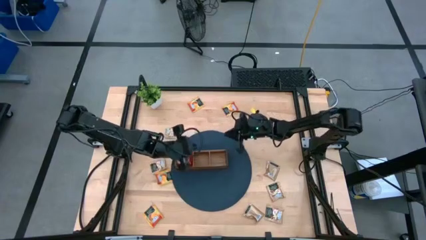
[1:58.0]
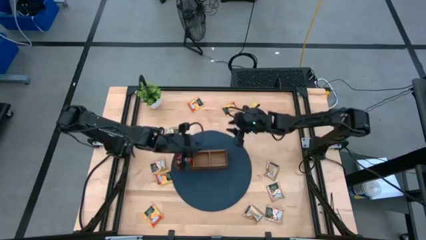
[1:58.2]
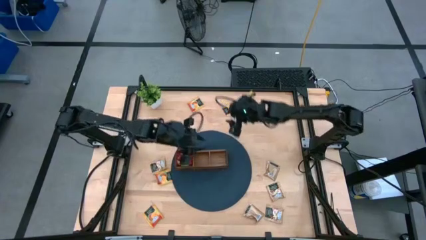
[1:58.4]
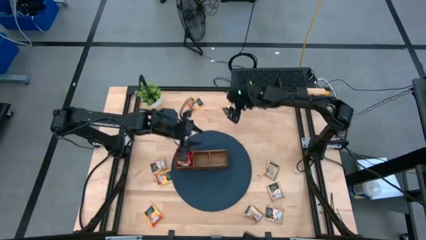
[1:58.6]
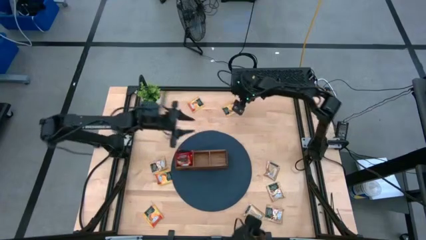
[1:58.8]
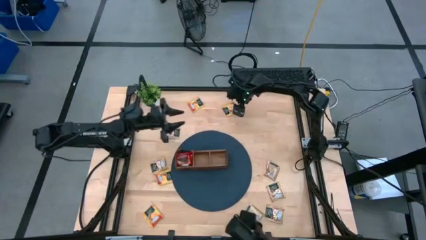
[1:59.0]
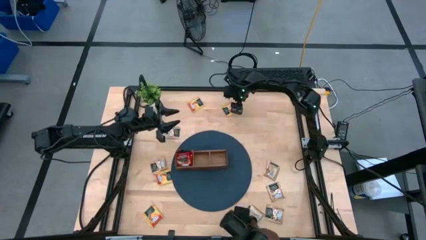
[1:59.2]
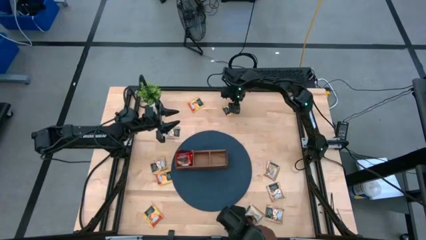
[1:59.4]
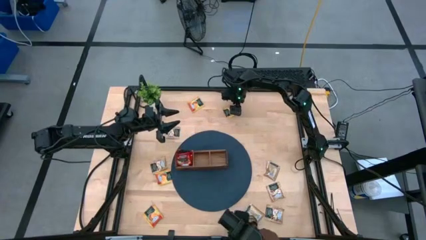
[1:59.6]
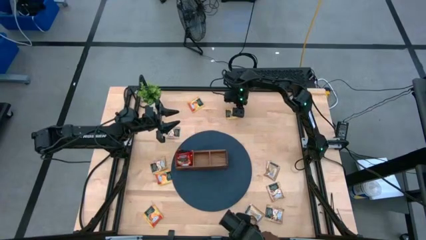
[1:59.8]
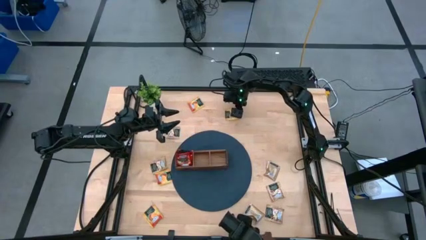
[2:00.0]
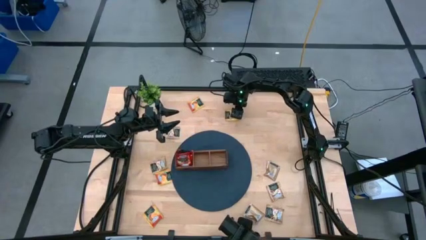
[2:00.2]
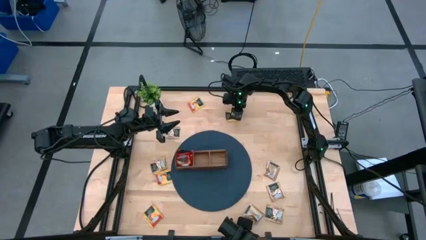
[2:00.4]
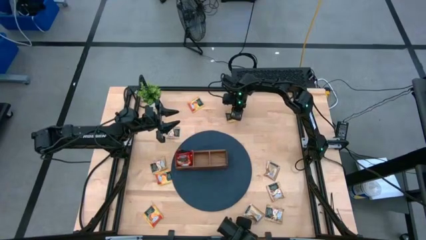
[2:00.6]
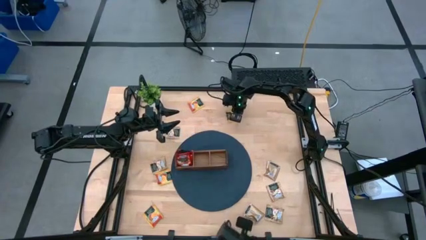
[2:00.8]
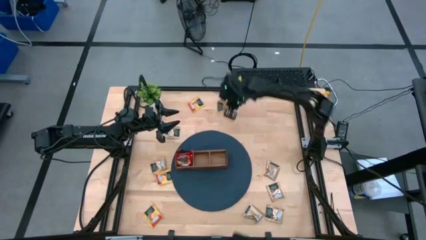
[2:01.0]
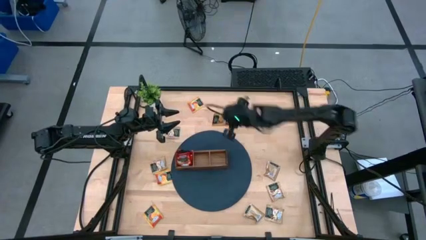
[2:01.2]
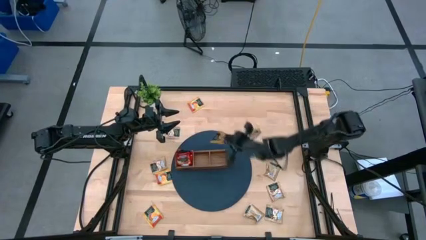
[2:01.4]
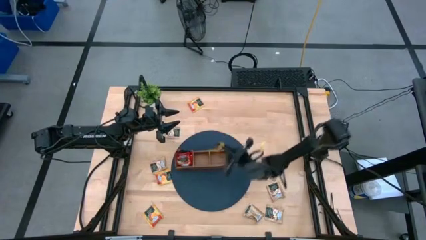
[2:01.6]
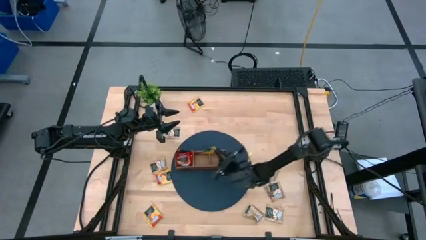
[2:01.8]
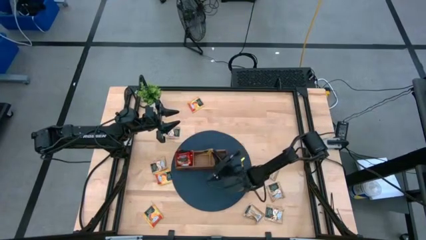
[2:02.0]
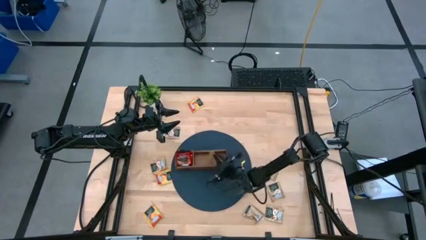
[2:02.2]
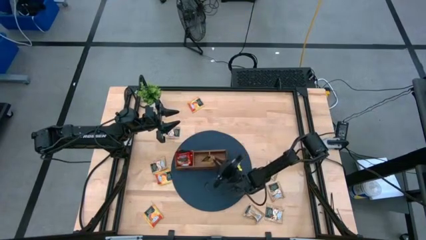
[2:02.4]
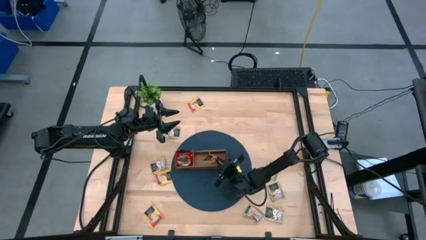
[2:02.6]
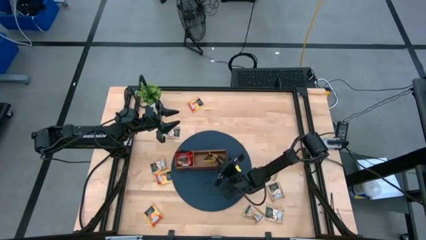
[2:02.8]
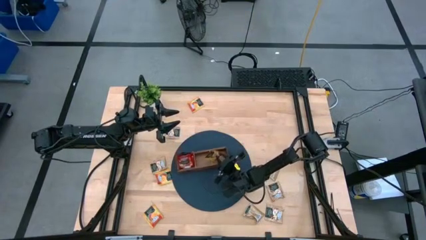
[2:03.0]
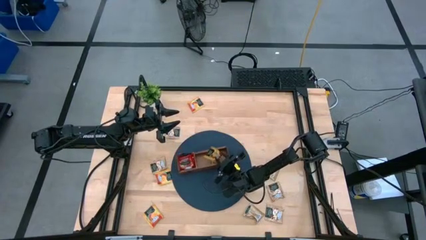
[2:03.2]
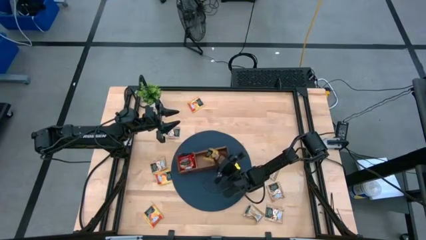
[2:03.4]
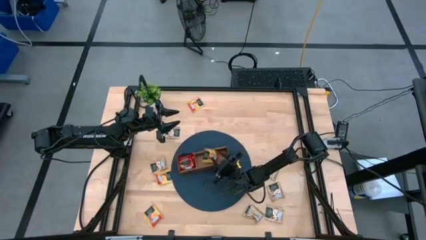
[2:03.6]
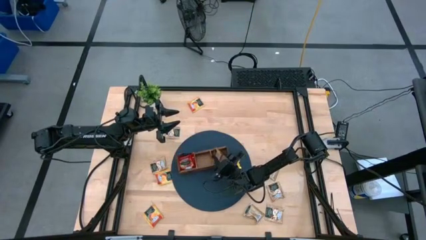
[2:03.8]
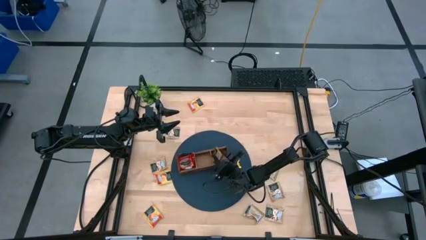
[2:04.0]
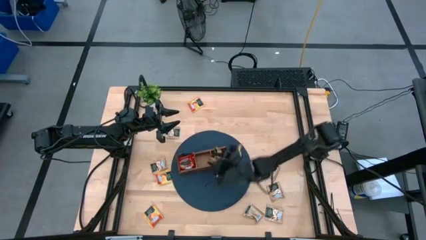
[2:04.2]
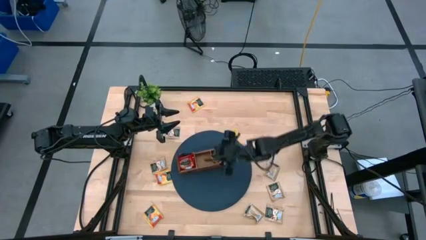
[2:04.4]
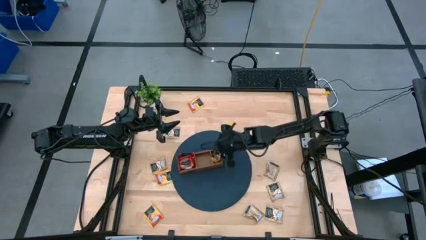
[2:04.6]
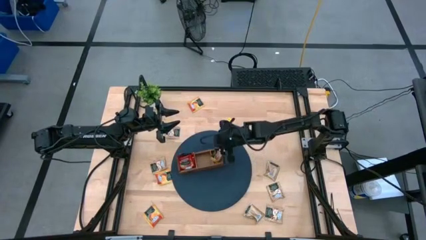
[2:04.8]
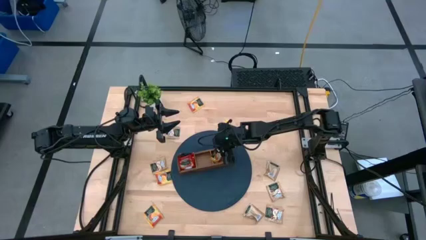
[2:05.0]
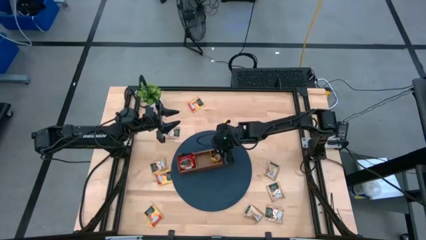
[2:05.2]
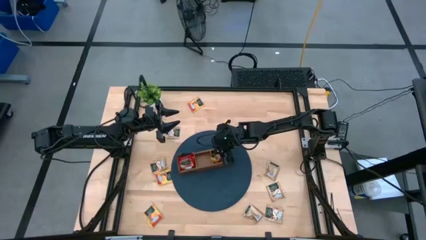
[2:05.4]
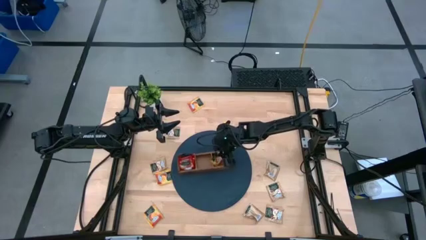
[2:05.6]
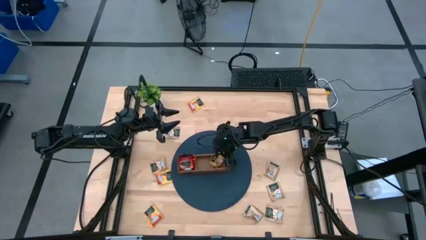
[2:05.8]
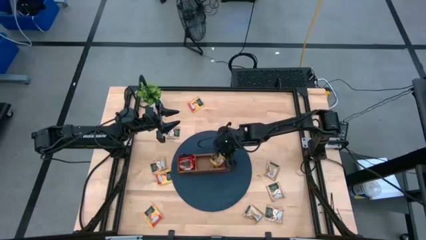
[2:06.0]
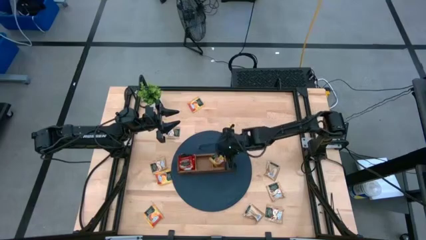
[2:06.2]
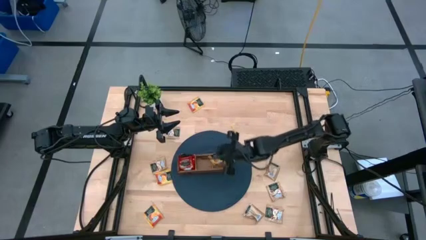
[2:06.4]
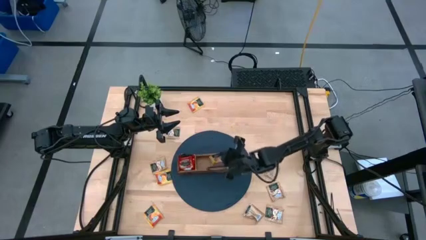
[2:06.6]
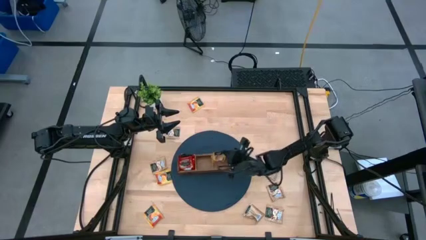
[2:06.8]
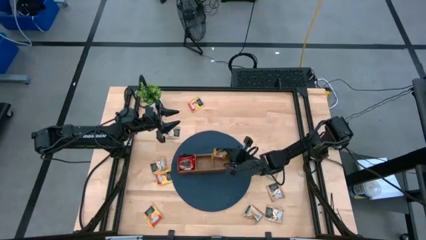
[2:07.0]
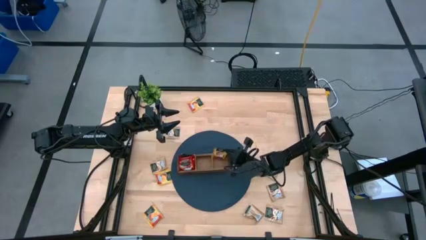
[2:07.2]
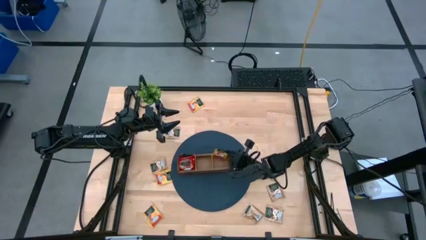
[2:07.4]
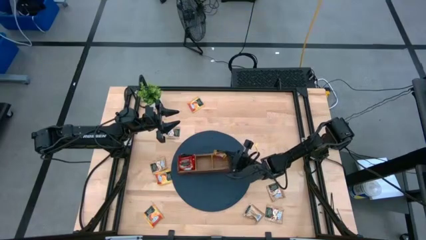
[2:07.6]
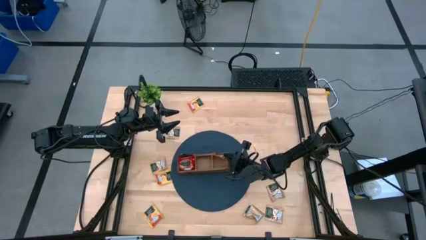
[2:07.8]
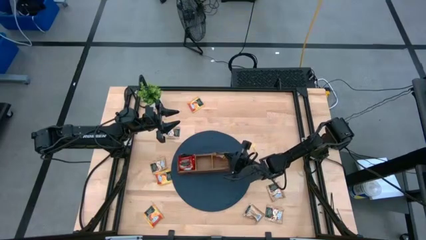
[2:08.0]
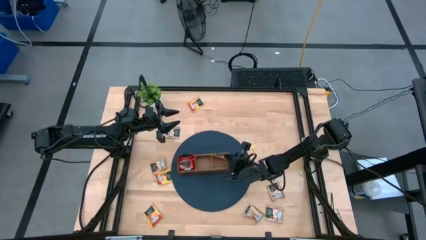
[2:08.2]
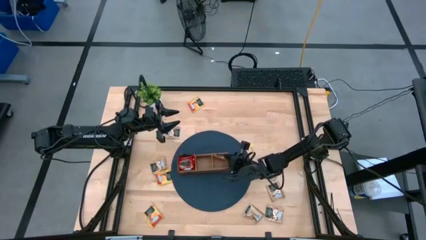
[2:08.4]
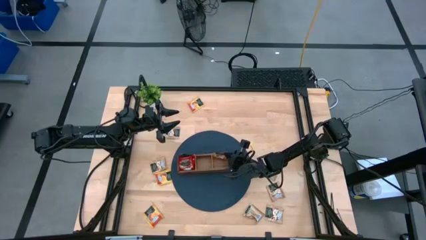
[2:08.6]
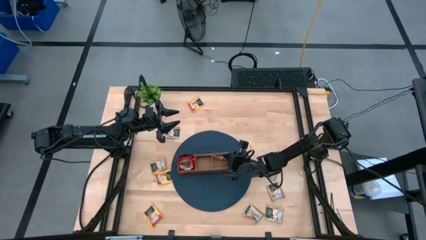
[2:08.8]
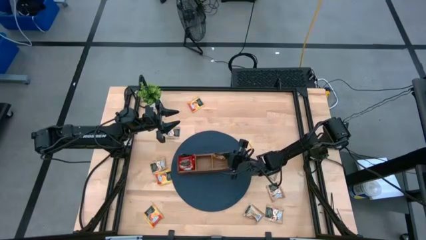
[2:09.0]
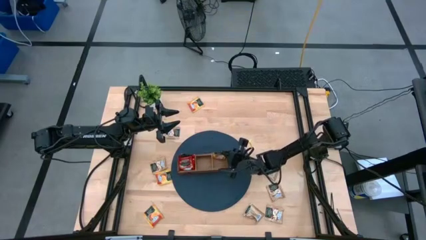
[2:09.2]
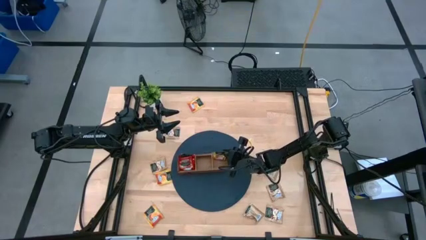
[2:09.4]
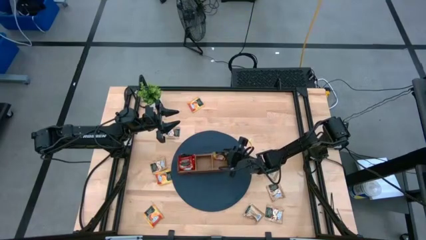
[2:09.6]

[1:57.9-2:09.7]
Task: Pick & Place Tea
Put the yellow tea bag into the right section of the wooden organizer

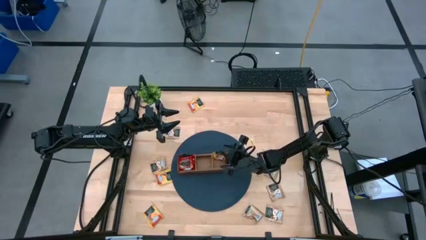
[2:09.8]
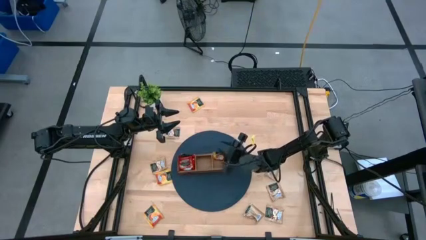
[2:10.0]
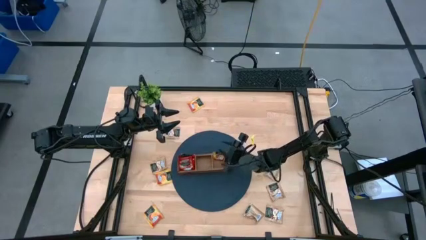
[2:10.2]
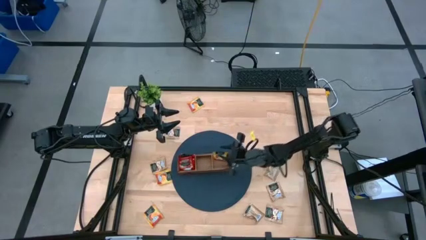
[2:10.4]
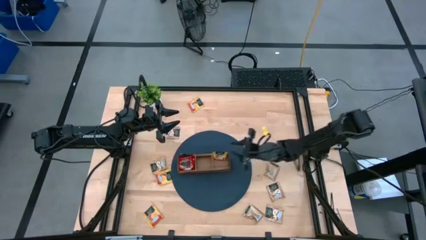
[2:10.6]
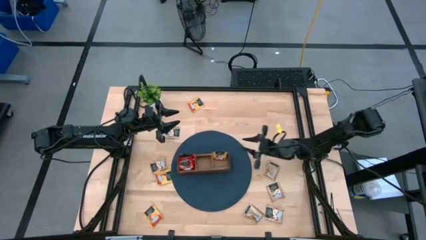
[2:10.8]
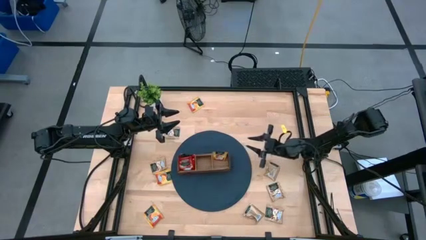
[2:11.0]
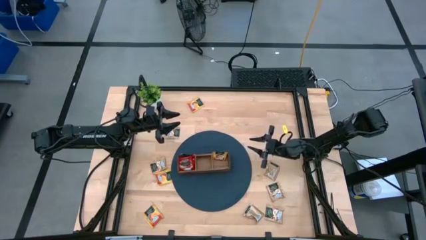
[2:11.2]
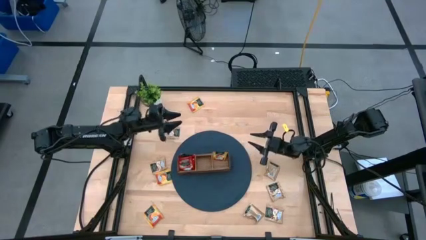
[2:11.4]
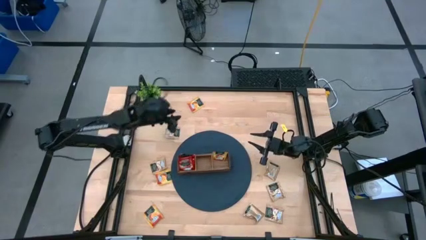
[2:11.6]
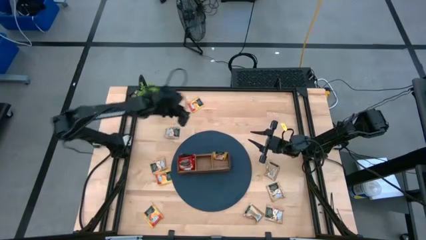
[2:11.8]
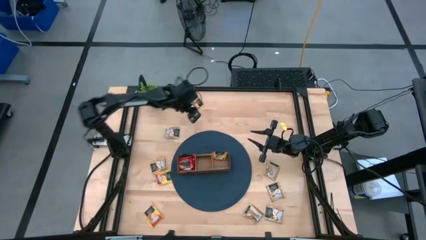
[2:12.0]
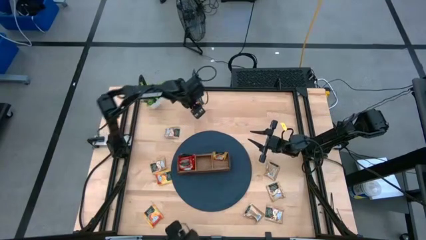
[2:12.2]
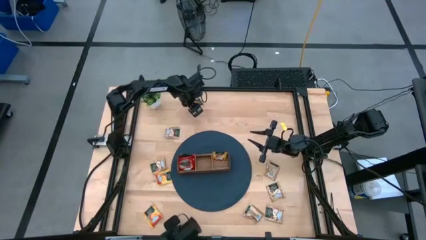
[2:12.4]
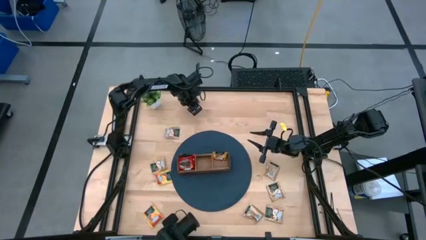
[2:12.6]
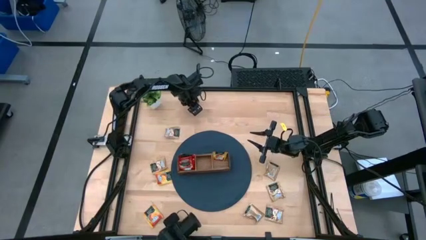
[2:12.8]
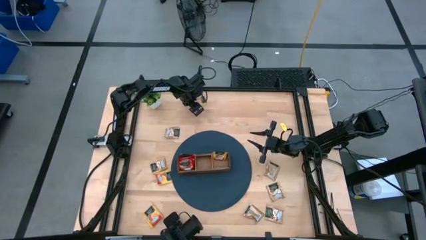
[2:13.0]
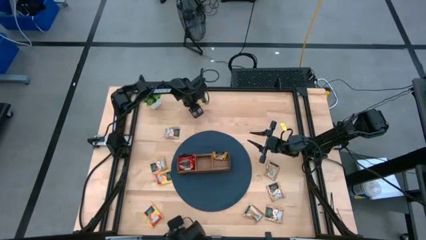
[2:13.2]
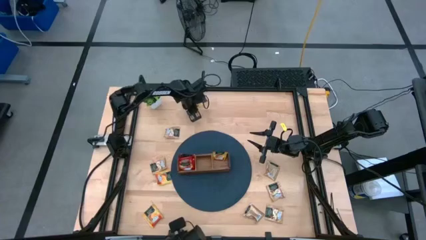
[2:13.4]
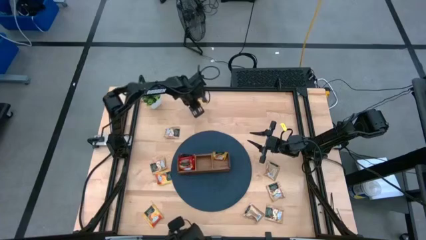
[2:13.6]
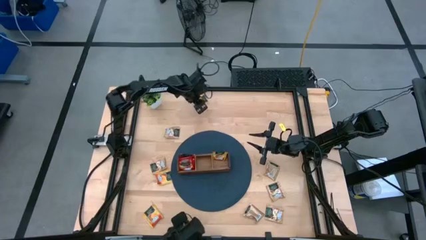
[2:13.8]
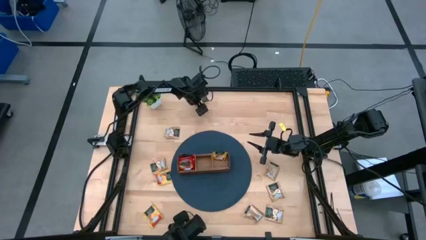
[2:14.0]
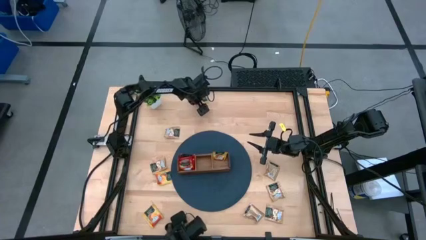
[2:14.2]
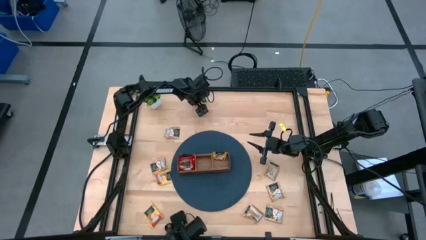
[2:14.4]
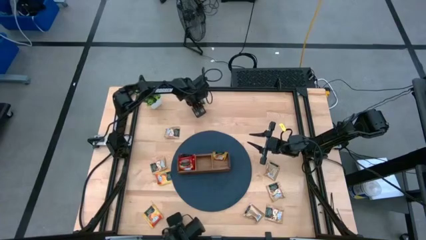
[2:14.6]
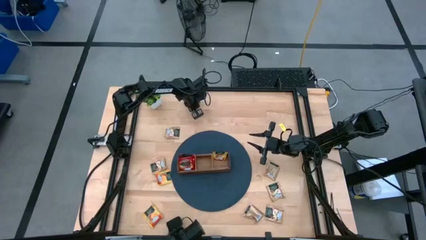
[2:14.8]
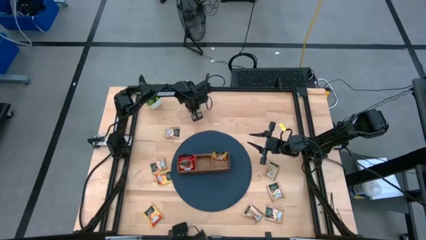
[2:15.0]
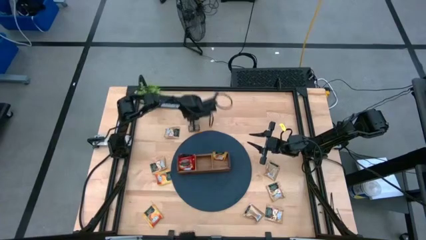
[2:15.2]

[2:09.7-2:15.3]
Put the top yellow tea bag into the right section of the wooden organizer
